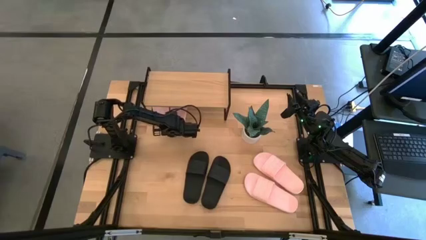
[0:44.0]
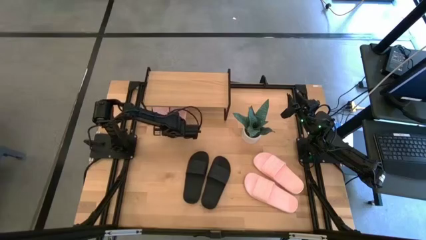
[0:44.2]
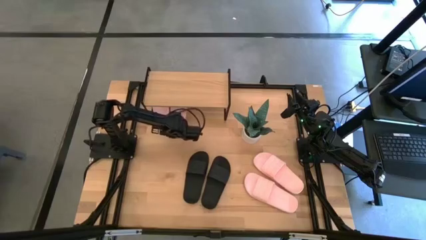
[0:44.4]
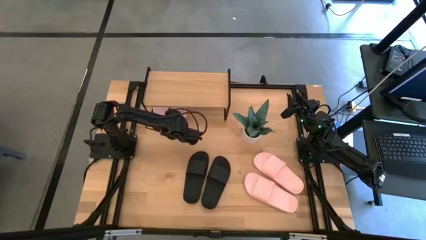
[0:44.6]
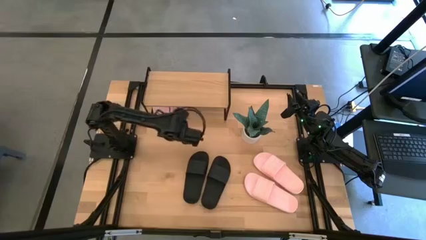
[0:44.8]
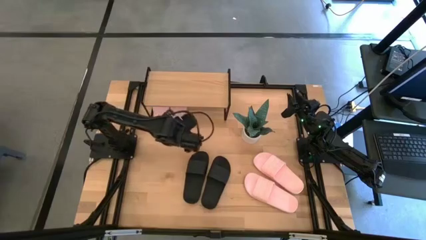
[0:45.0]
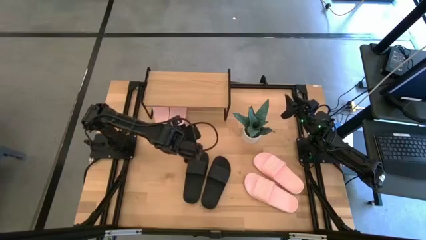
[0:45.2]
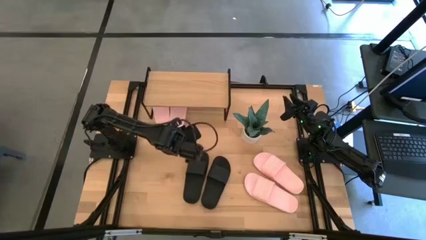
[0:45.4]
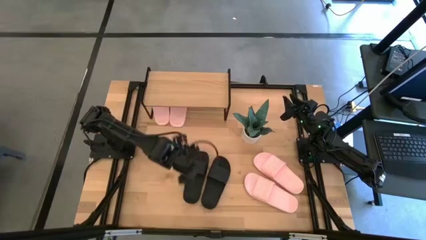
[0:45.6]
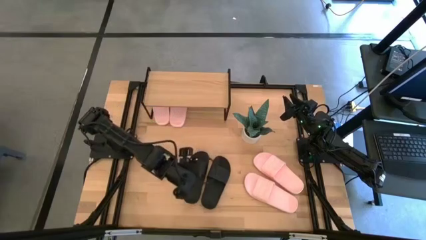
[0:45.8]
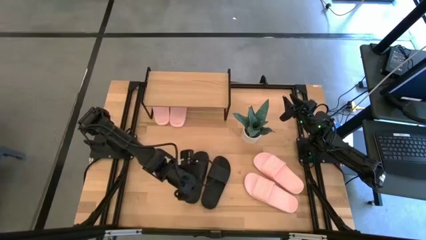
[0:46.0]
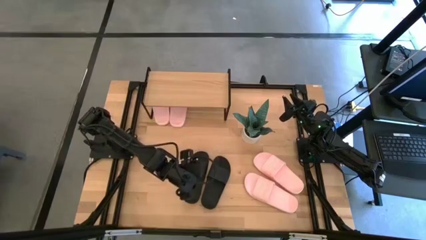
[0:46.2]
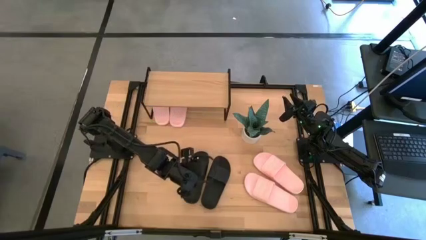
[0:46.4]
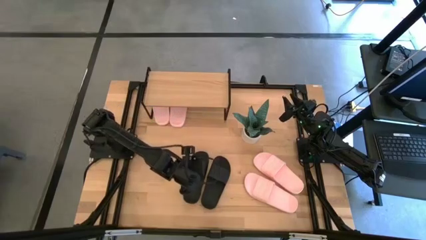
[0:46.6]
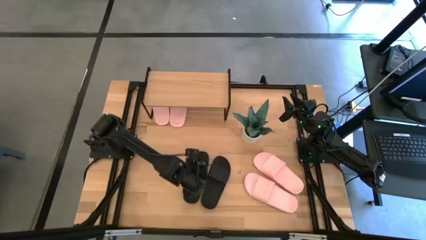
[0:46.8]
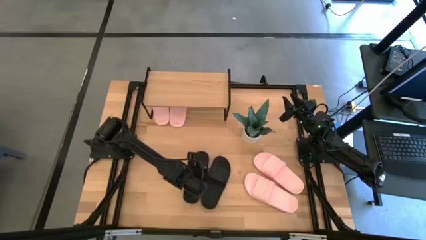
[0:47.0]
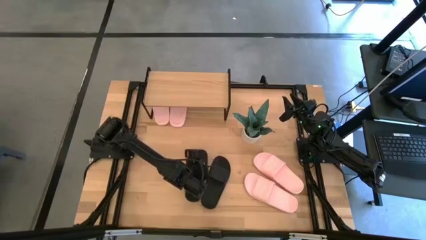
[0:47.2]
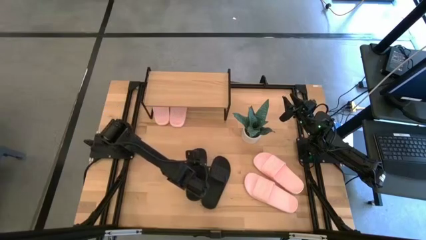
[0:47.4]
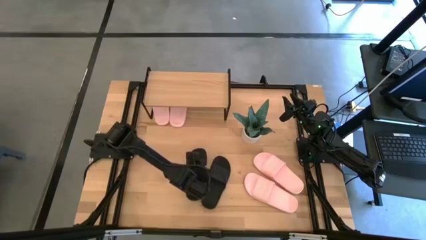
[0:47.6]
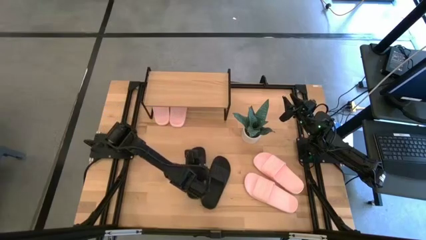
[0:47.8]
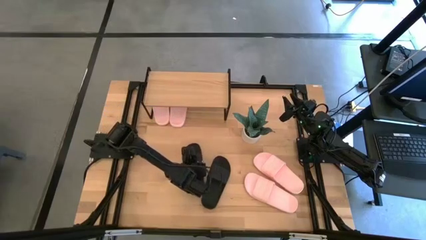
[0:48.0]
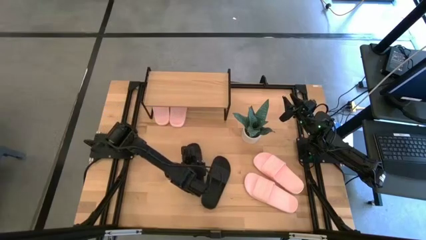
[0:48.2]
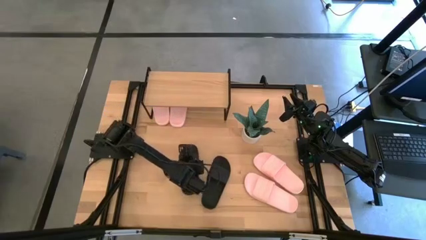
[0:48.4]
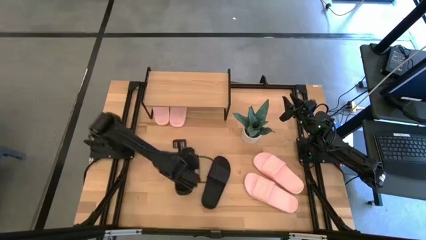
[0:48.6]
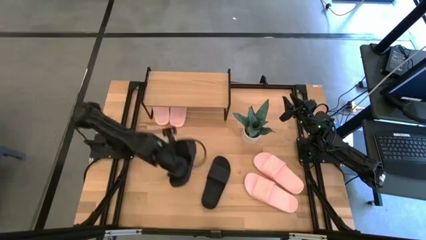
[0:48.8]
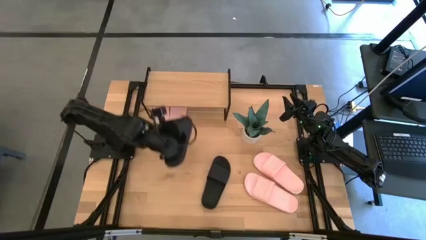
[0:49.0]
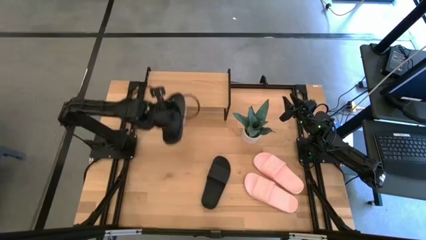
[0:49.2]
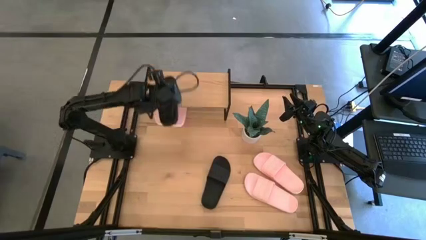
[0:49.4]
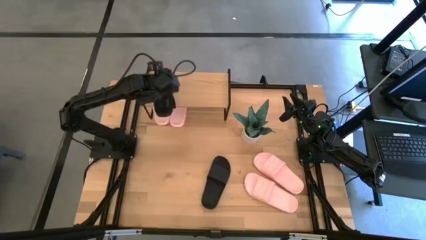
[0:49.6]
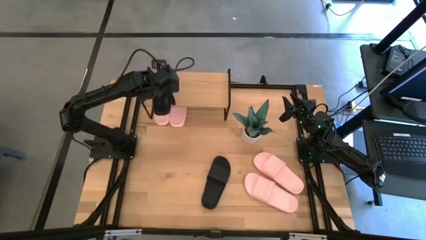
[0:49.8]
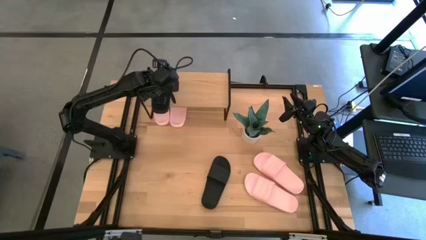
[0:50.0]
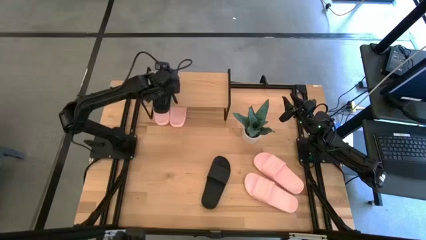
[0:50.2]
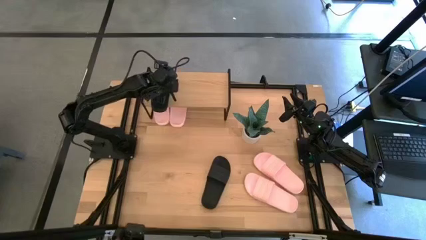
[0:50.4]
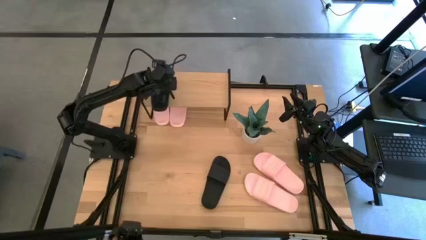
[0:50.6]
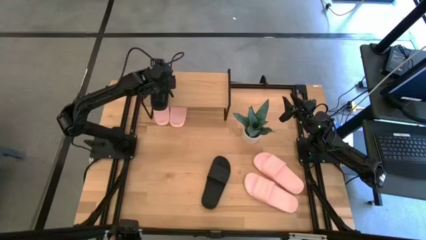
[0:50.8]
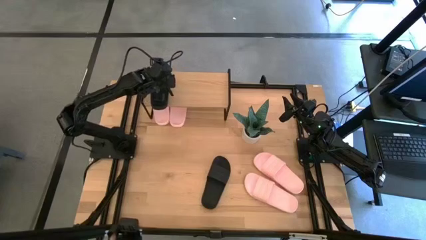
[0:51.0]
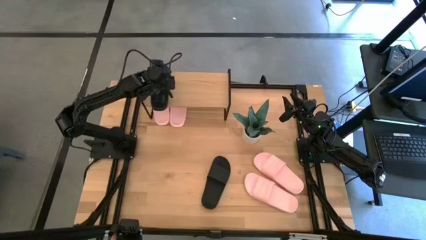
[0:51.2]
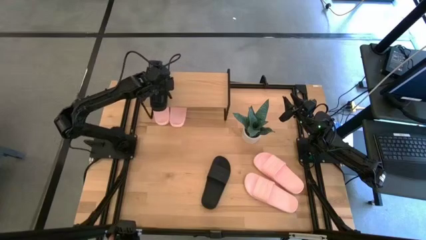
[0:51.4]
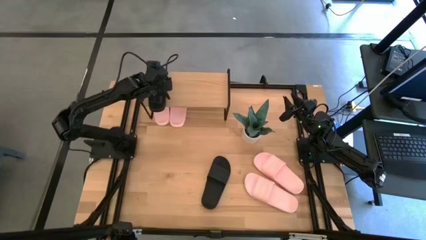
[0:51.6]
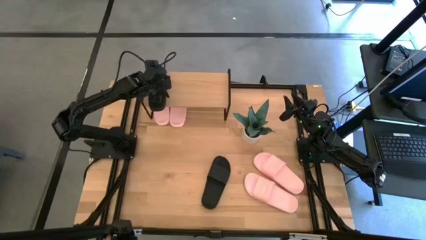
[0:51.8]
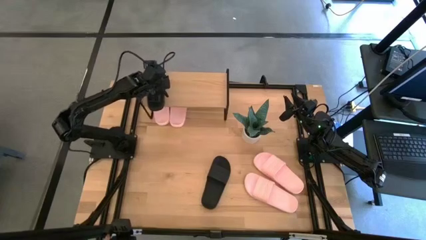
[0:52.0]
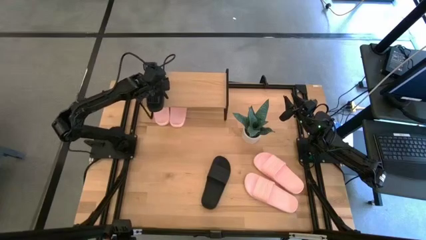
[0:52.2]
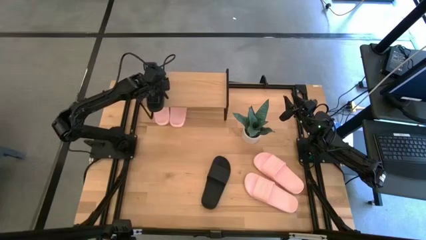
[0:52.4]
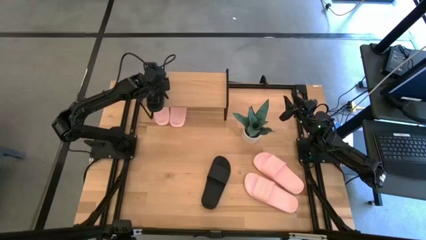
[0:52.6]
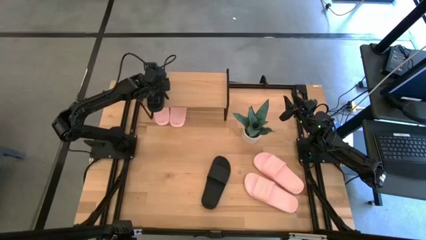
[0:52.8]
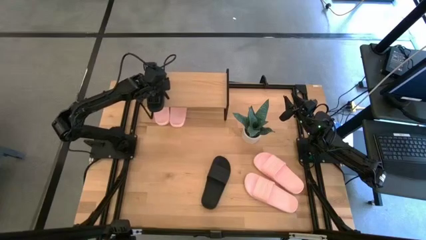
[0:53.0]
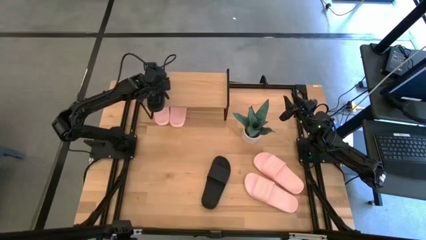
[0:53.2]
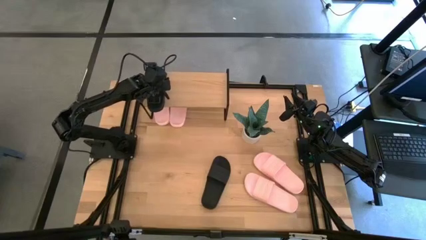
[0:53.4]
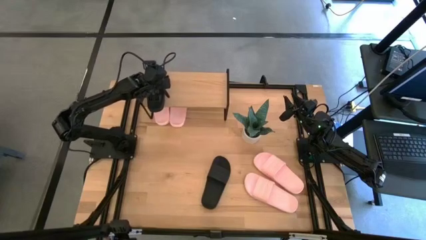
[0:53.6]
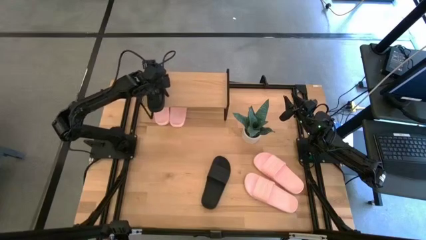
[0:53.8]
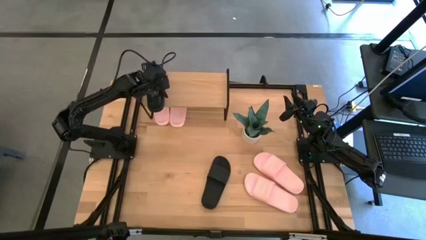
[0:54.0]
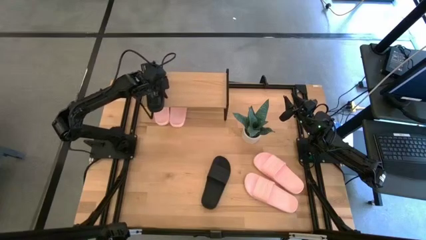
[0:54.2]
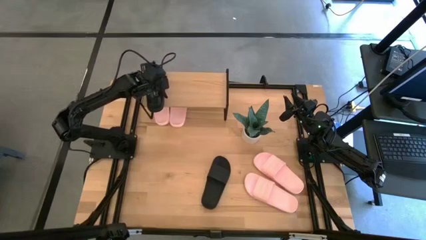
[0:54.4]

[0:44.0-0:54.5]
Task: Pick and place slides into the shelf
Put the black slipper on the shelf

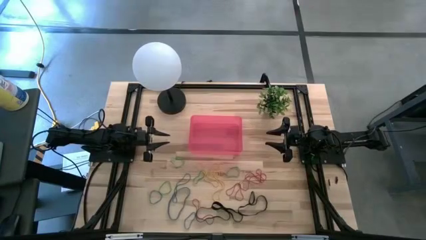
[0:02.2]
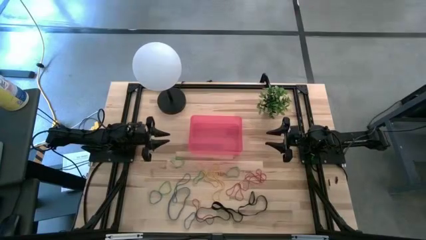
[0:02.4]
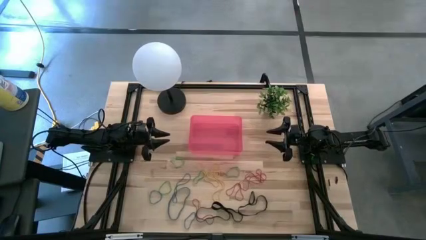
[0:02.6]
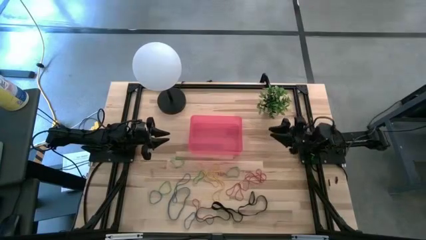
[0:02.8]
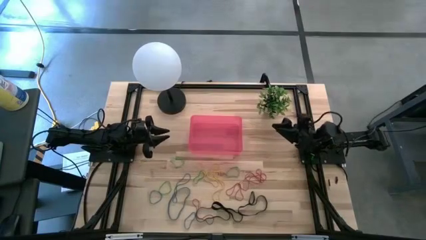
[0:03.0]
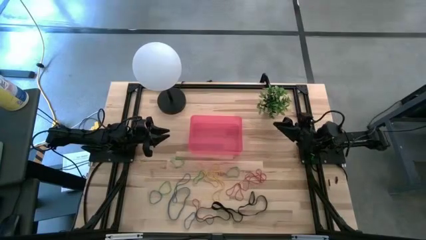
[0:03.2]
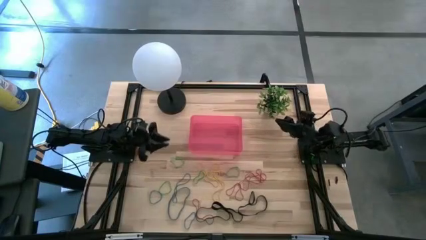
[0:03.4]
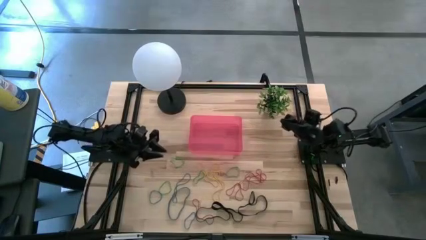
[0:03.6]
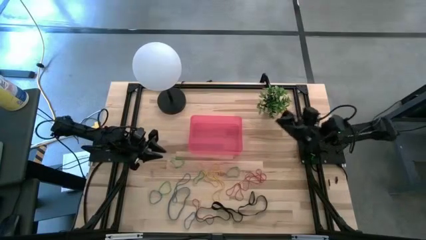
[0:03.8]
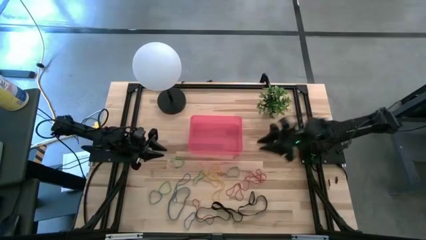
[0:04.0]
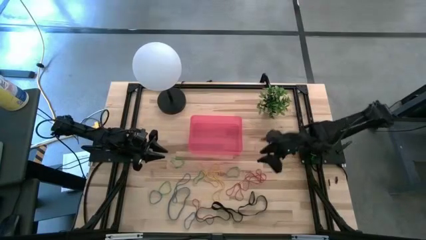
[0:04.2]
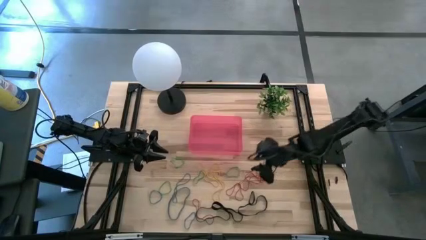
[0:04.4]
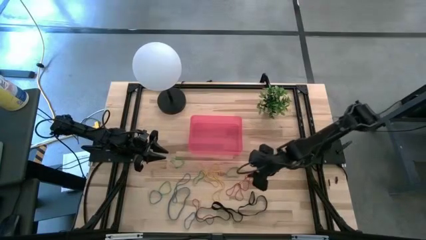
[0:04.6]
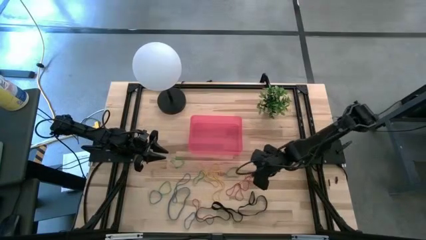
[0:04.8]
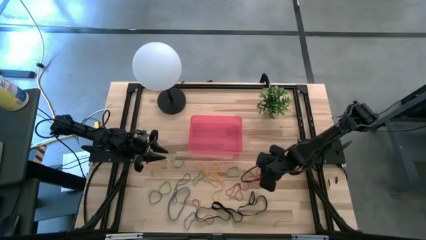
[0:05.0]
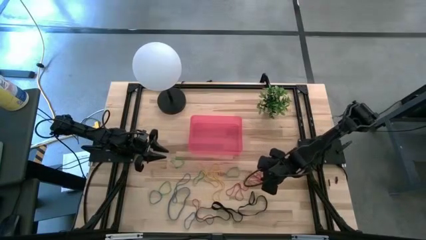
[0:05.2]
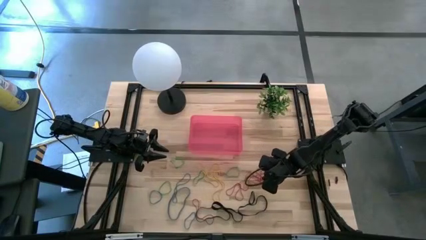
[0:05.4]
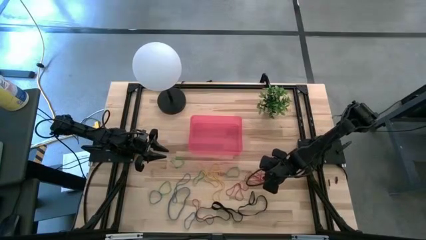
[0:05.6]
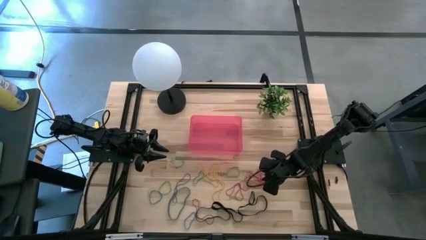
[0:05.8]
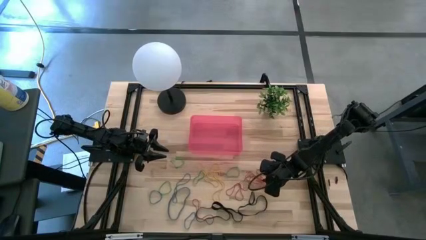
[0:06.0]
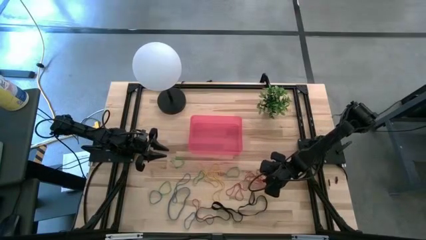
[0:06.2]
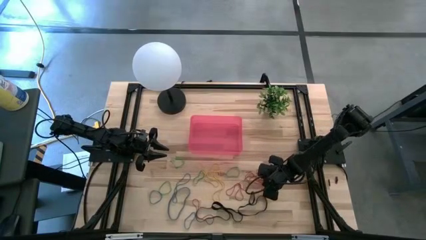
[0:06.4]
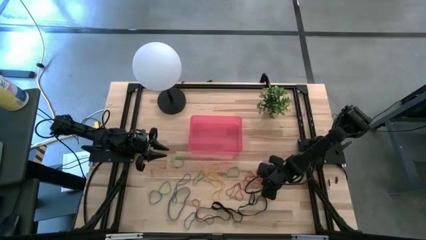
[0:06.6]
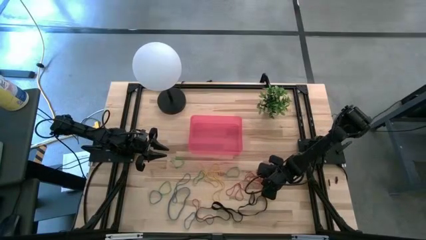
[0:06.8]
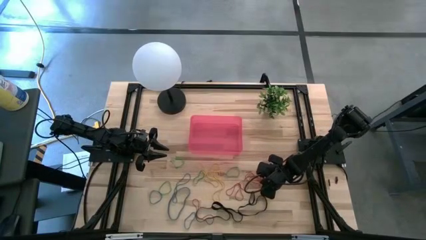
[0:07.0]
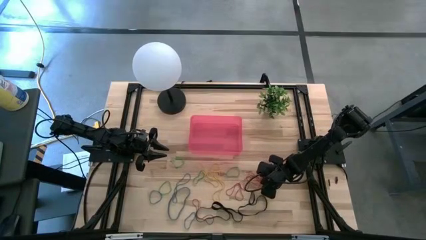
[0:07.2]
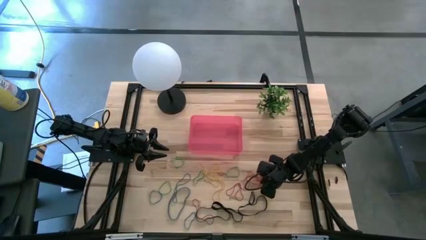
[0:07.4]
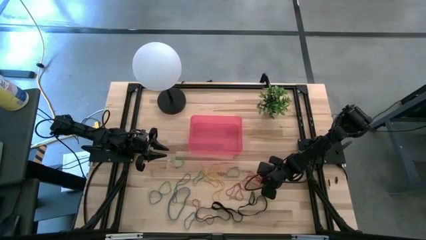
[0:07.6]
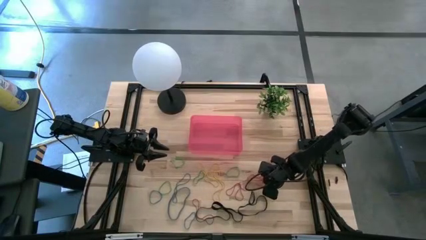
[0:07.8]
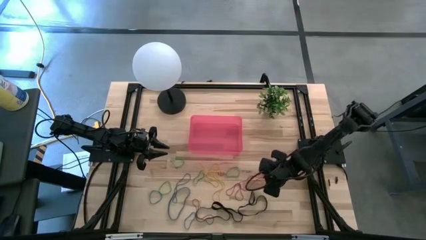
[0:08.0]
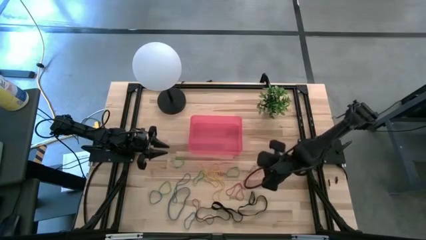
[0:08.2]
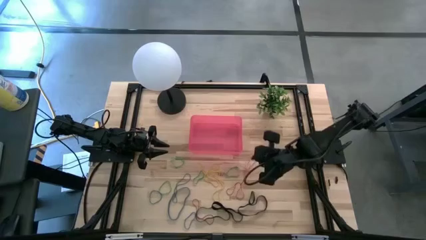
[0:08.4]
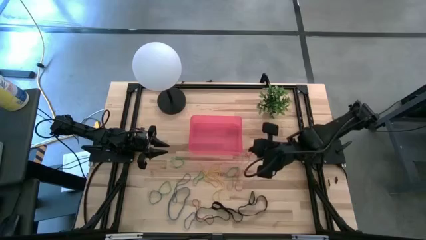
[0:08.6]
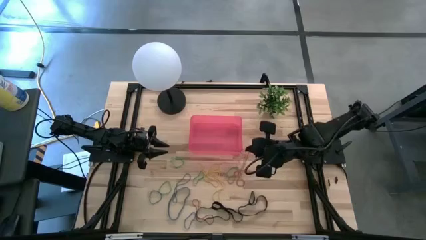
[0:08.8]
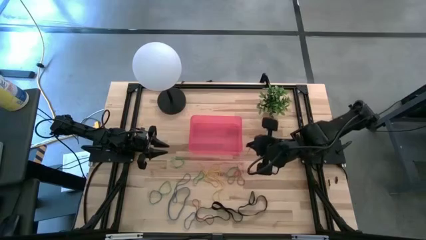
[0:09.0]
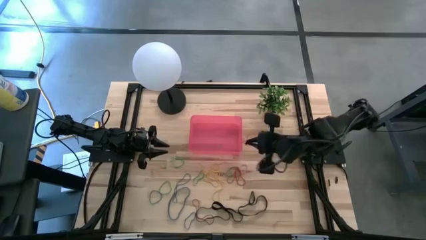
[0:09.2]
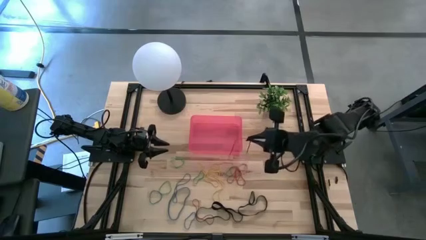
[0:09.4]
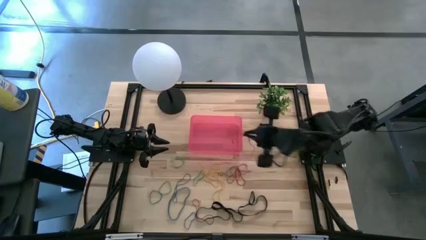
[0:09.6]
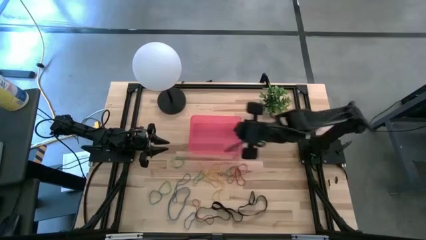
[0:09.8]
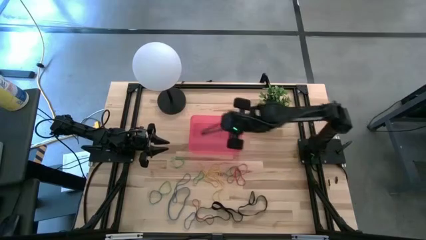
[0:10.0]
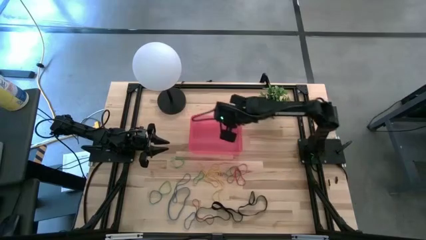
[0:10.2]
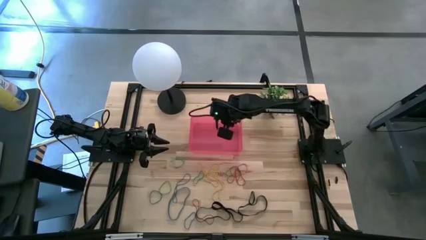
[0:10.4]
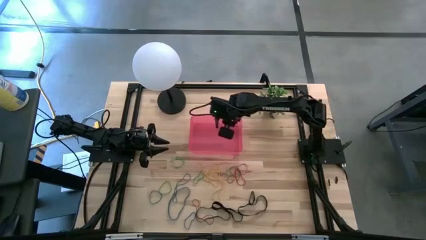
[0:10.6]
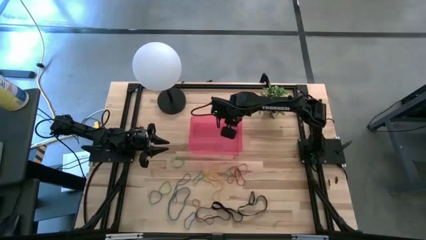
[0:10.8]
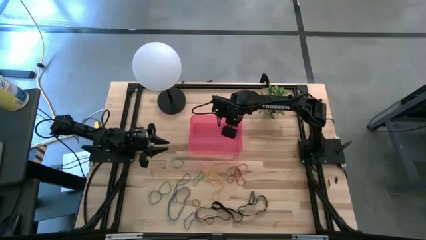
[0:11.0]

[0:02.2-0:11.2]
Task: Pick and place rubber bands into bin
Put the red rubber band into the red bin
